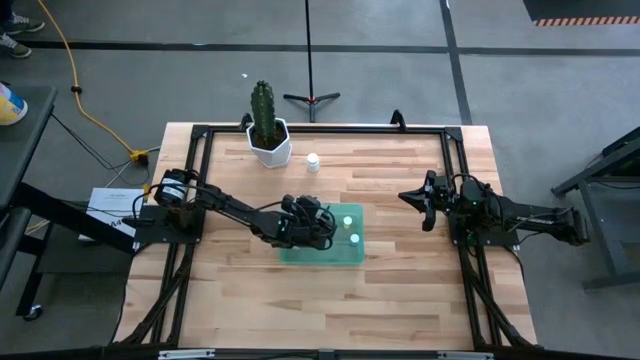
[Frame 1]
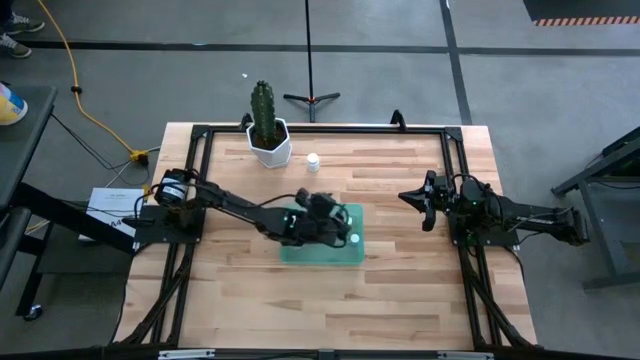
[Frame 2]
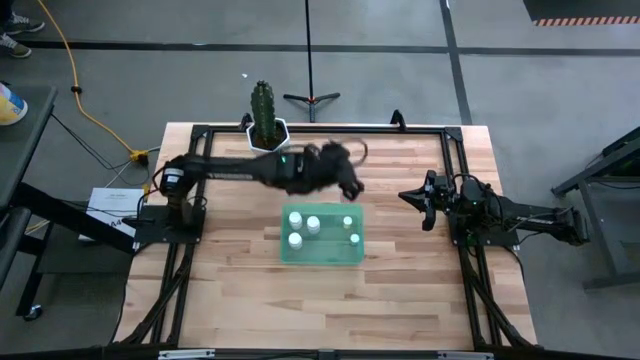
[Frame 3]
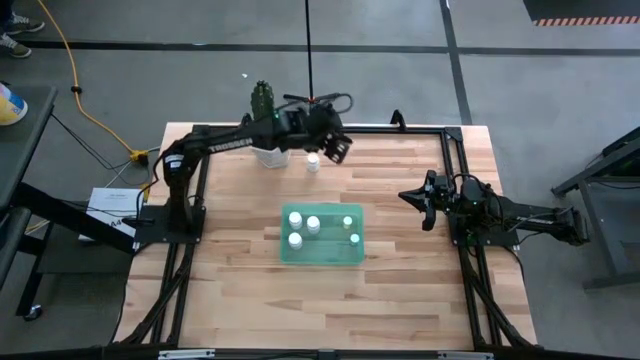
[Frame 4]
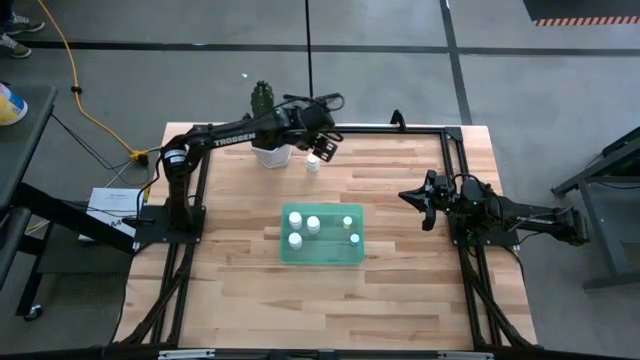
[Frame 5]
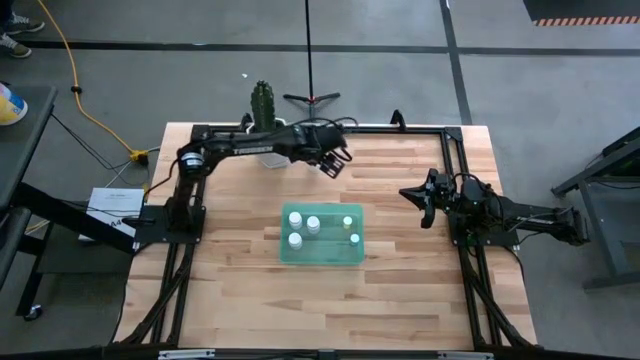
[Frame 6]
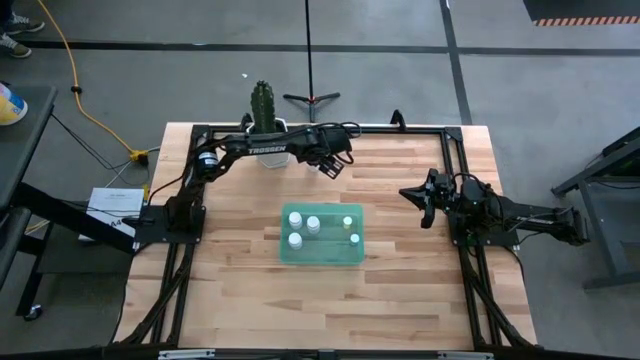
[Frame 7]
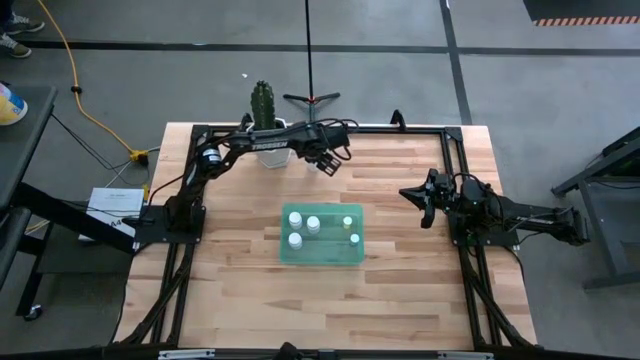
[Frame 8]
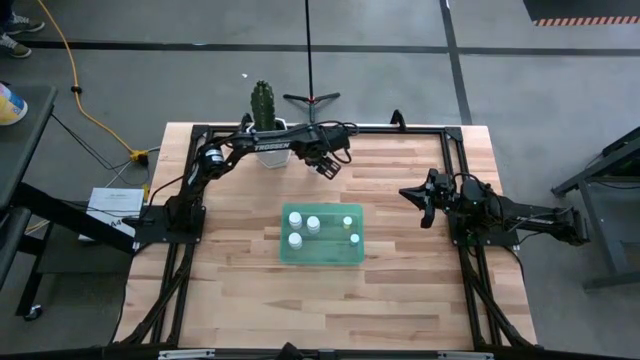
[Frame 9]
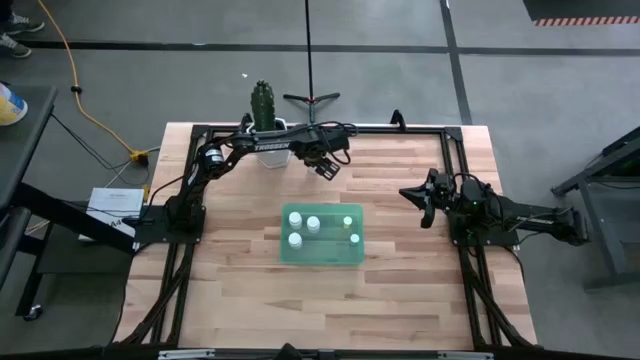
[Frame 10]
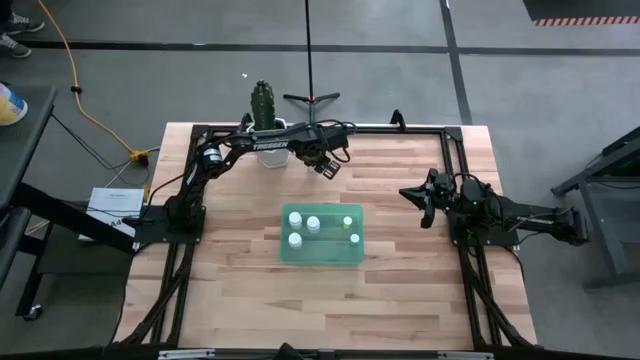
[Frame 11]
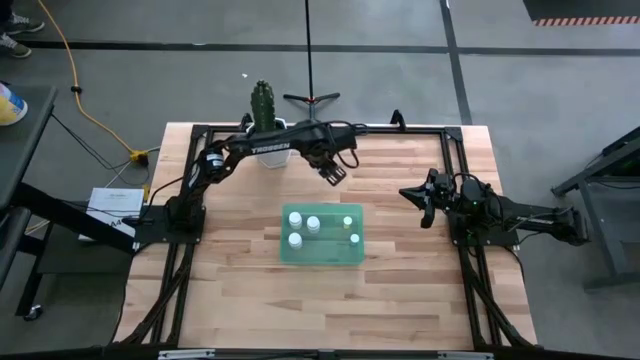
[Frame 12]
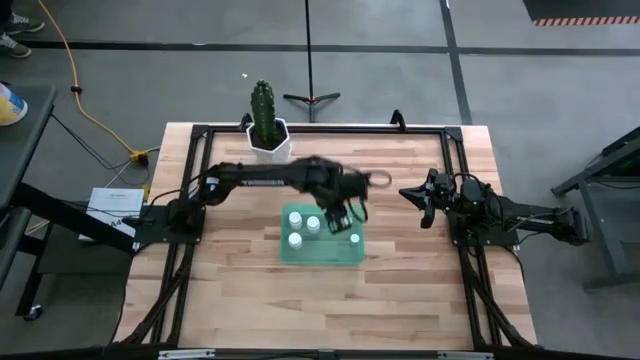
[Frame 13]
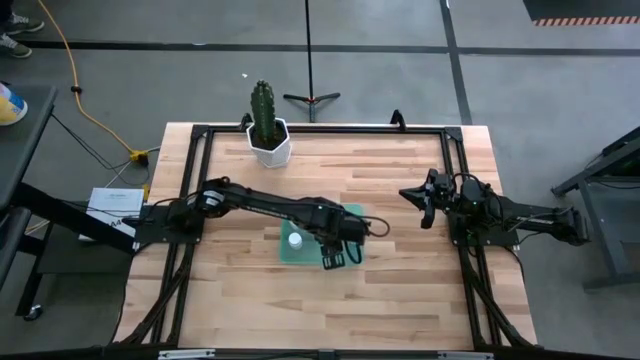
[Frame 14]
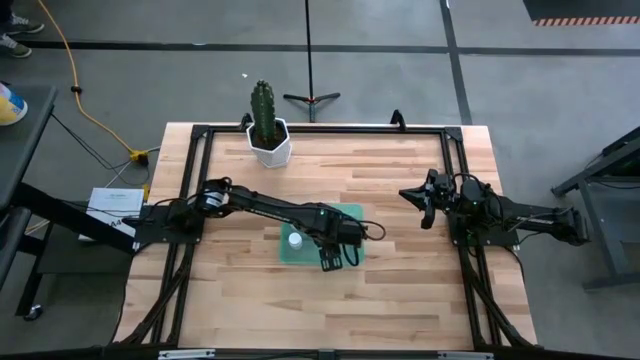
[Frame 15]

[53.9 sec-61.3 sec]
Task: Pick and place pill bottles into a basket
Put the white pill bottle into the blue bin

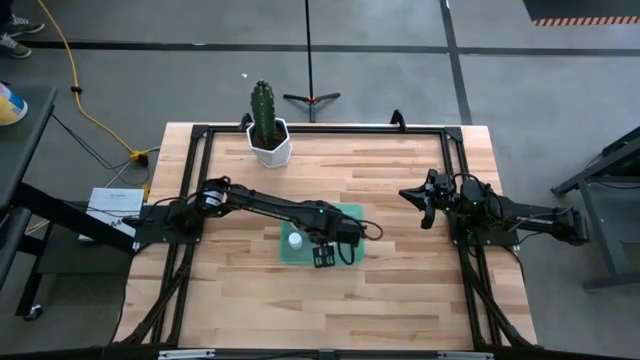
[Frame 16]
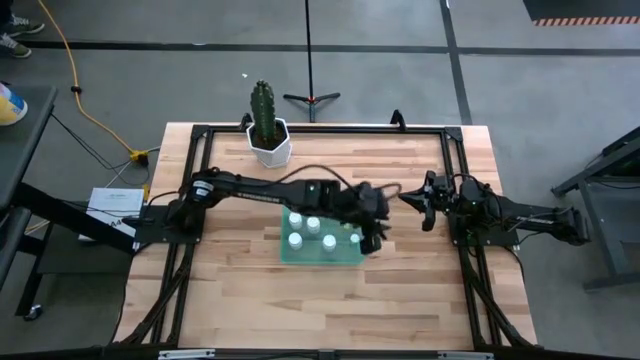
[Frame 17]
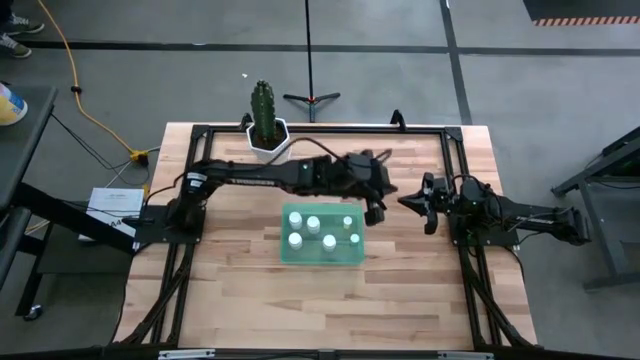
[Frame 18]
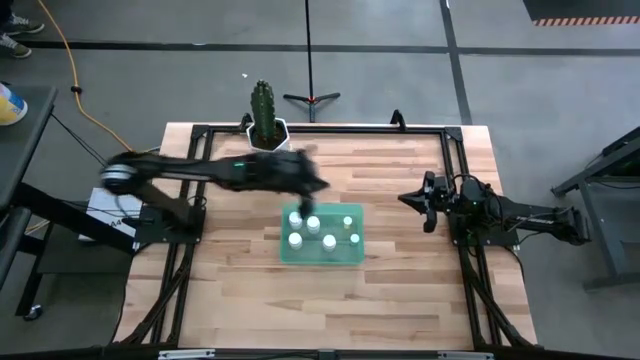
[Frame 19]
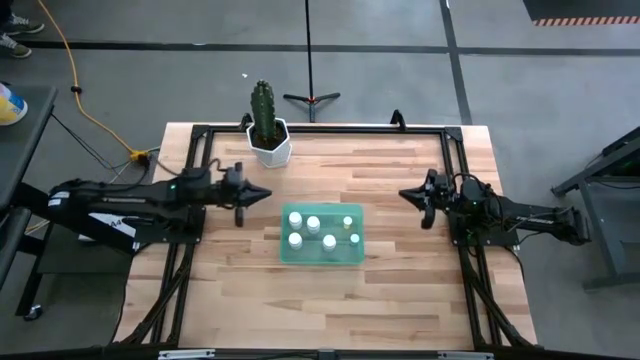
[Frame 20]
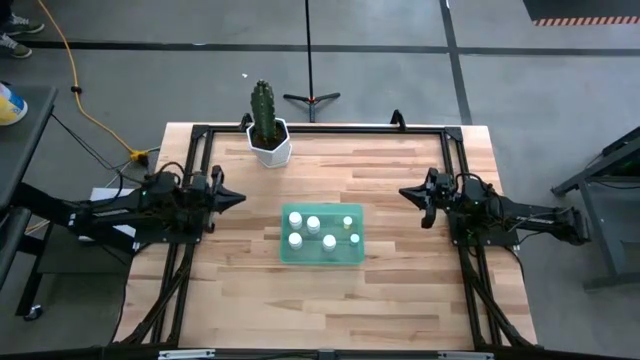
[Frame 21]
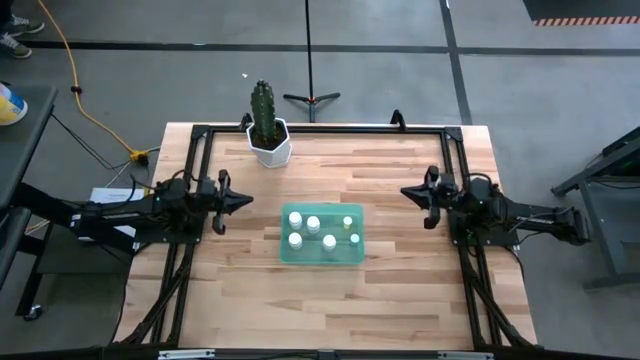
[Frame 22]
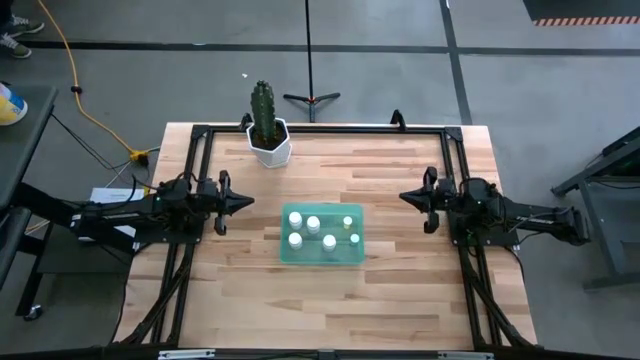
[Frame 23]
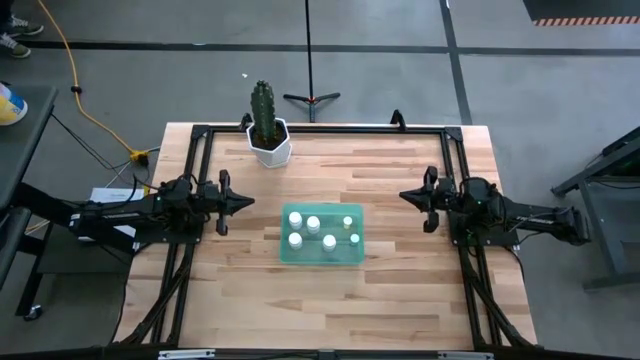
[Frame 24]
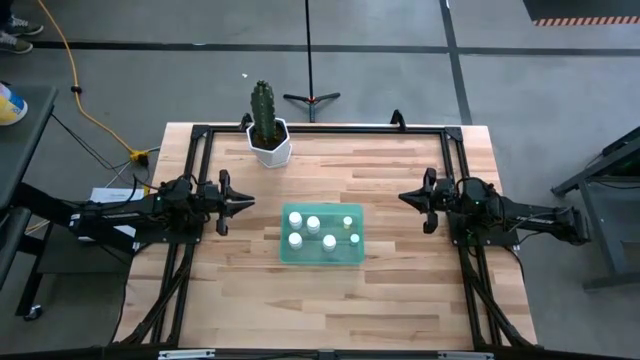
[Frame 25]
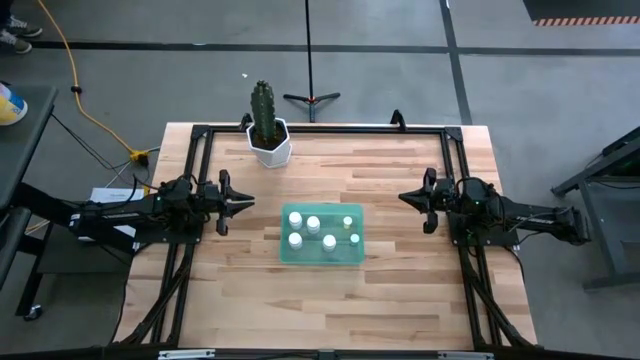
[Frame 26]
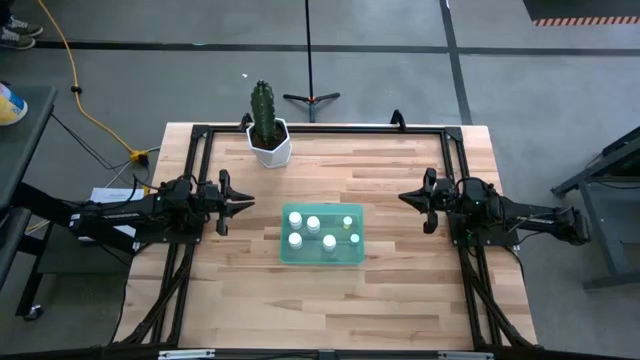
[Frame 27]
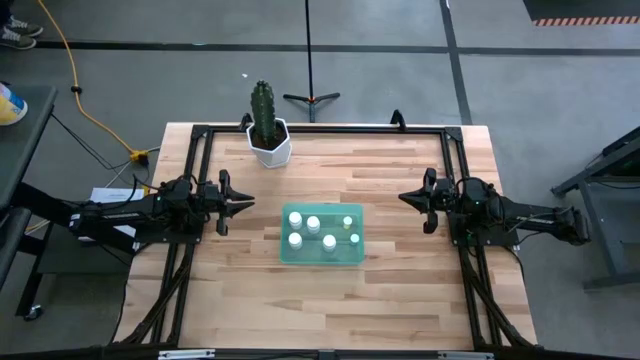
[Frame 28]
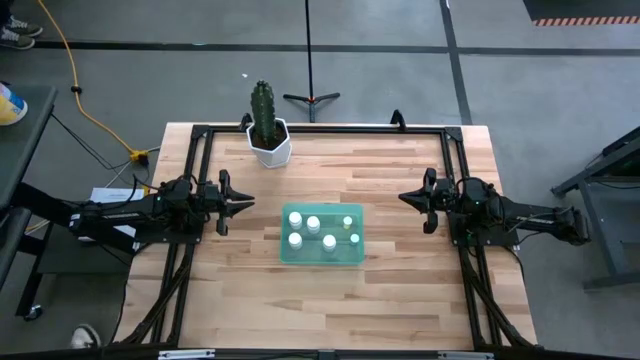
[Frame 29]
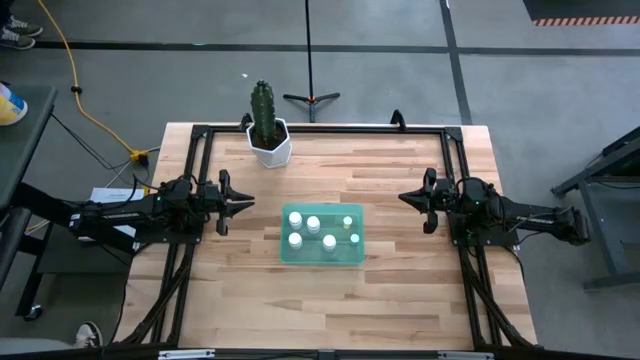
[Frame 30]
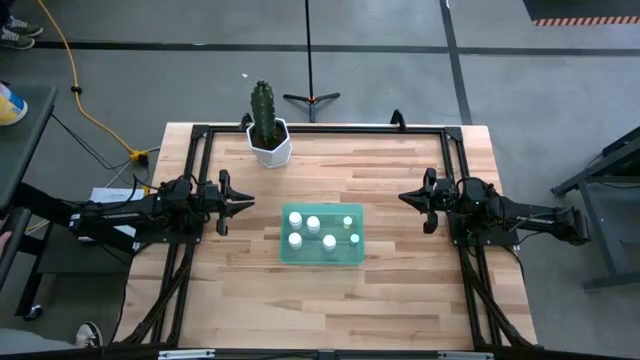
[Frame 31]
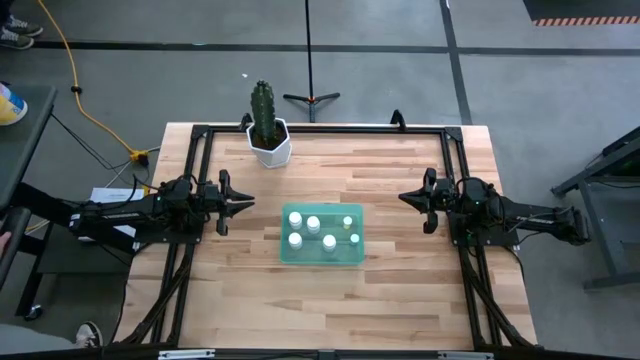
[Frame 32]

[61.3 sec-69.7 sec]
Return to Home Position

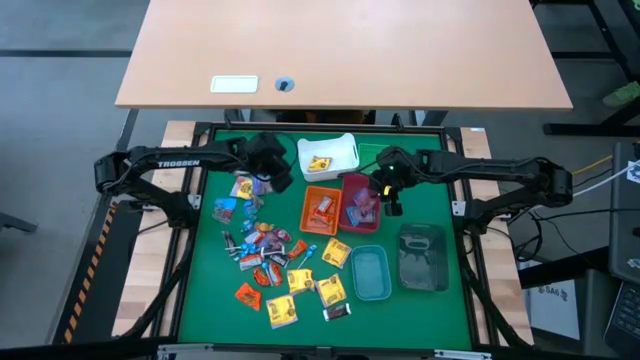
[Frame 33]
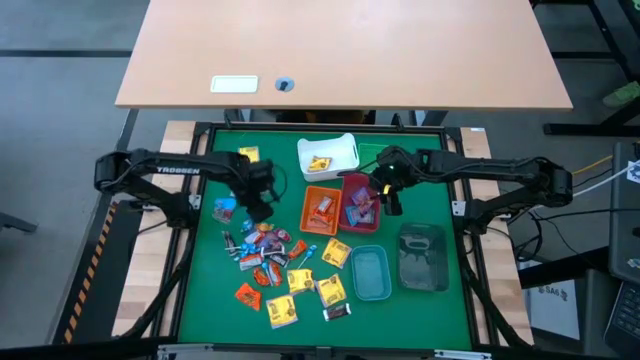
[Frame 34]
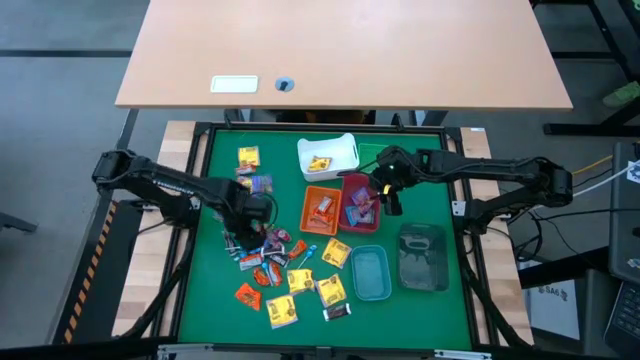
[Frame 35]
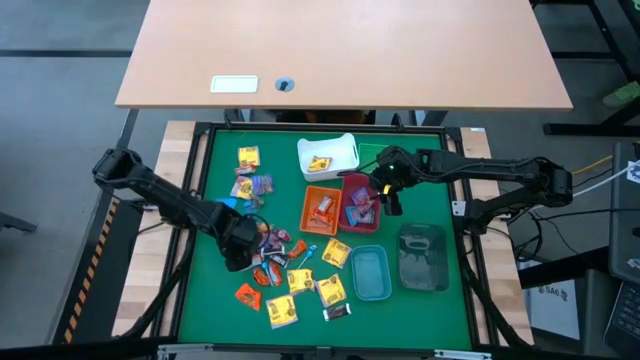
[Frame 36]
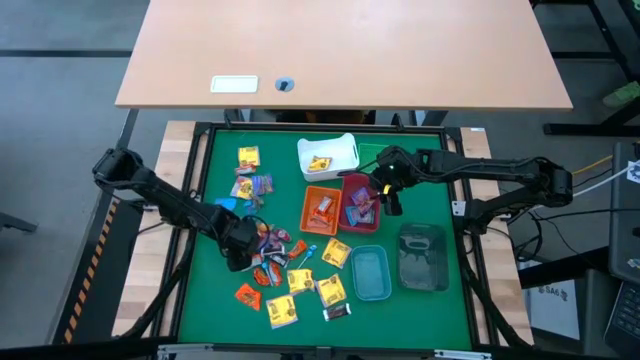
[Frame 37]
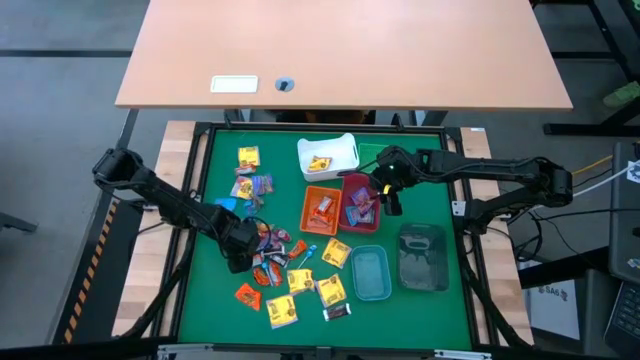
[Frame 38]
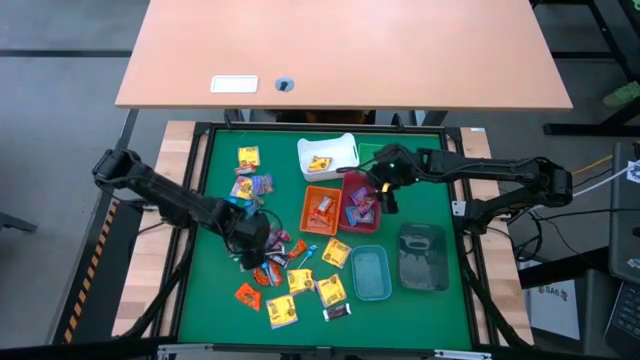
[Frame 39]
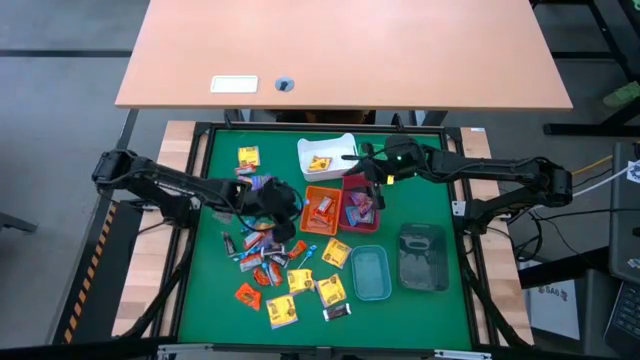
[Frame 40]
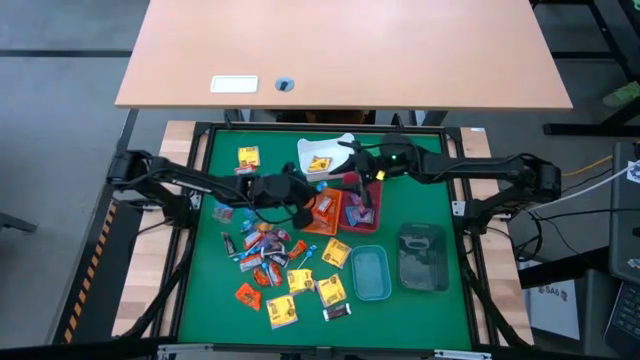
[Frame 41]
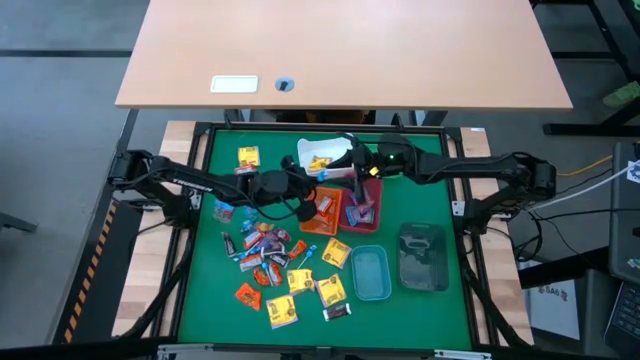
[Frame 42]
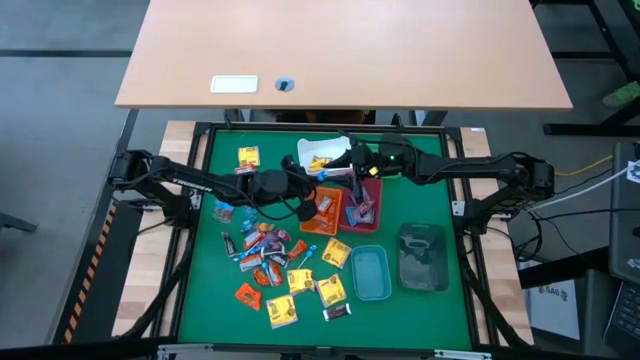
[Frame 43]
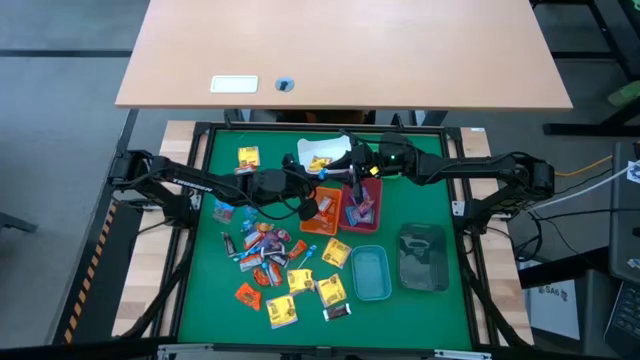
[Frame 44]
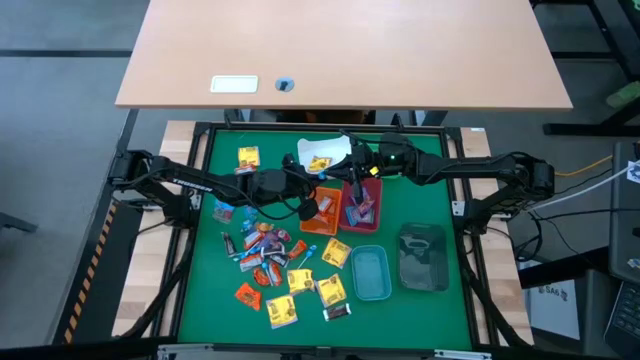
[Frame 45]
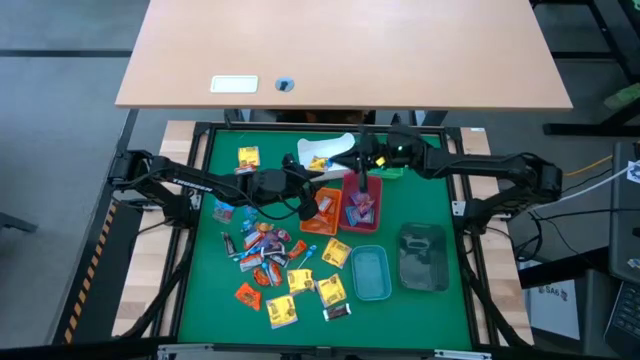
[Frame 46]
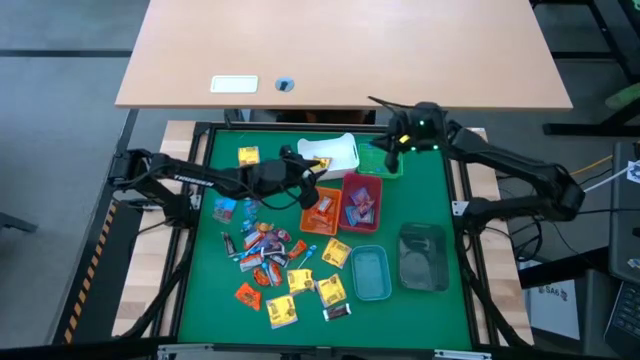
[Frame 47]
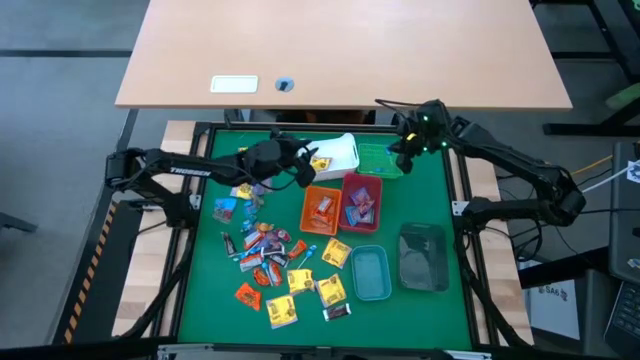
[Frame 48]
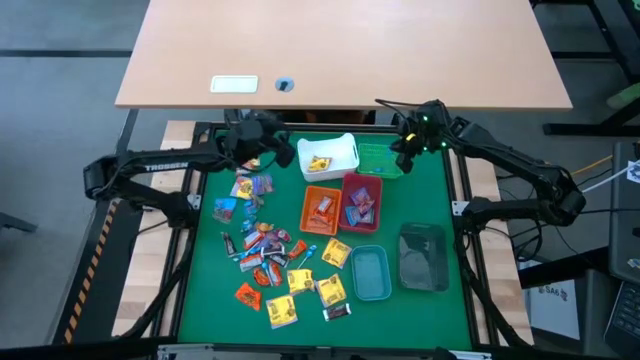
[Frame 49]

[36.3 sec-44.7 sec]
Task: Sort candy
Put the blue lollipop into the green basket
